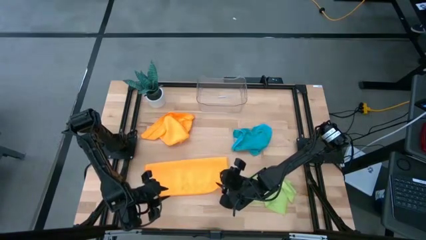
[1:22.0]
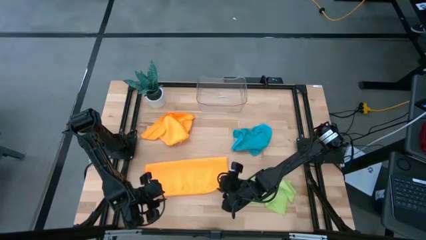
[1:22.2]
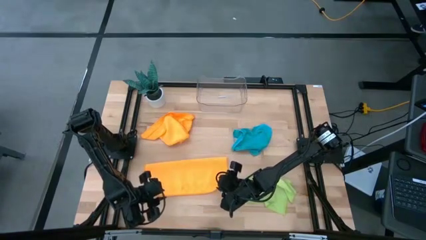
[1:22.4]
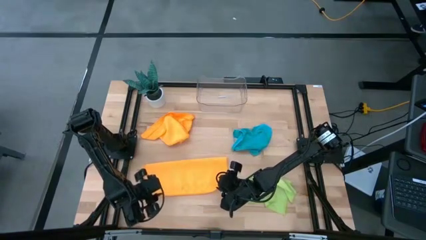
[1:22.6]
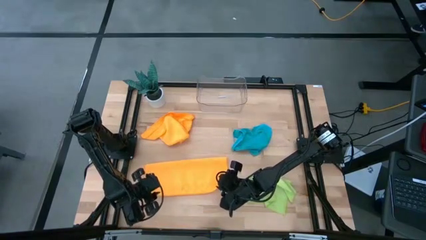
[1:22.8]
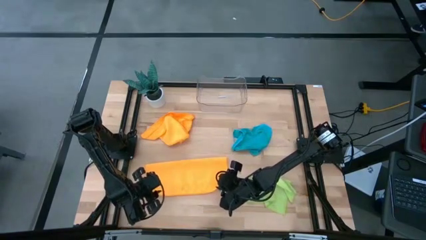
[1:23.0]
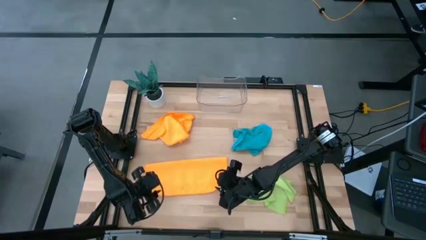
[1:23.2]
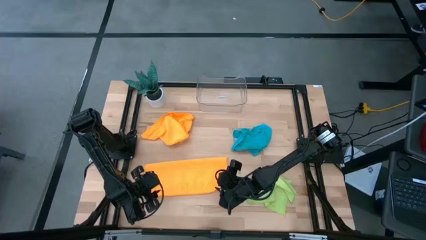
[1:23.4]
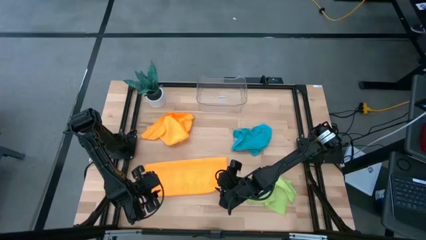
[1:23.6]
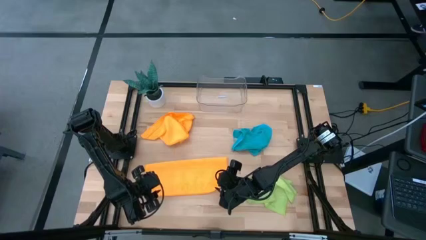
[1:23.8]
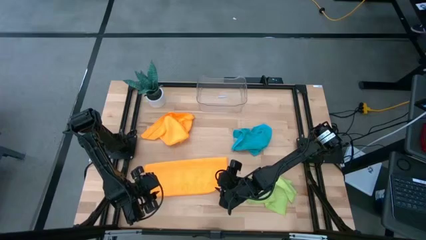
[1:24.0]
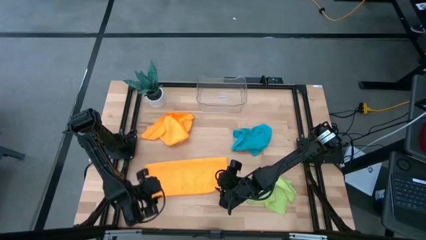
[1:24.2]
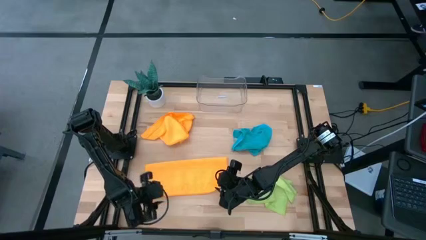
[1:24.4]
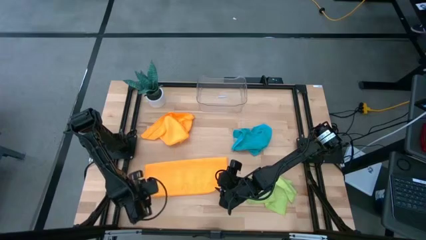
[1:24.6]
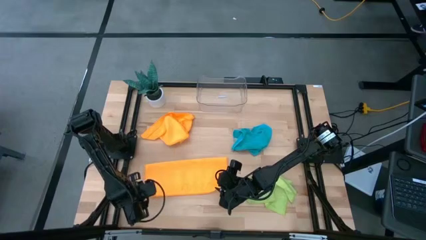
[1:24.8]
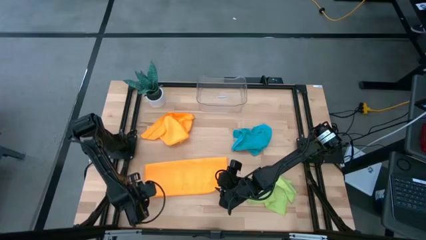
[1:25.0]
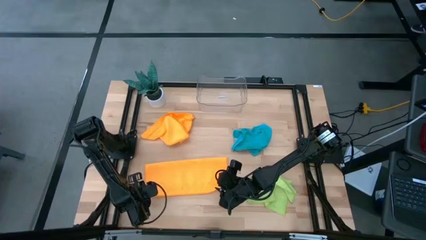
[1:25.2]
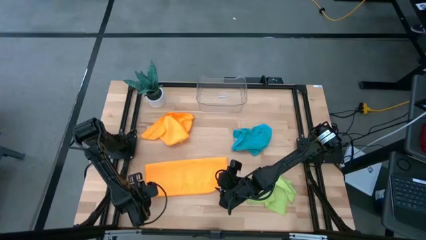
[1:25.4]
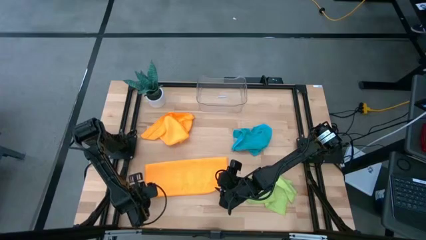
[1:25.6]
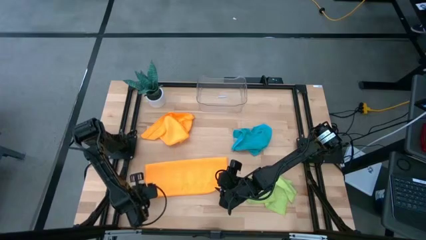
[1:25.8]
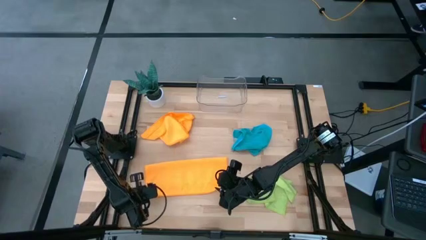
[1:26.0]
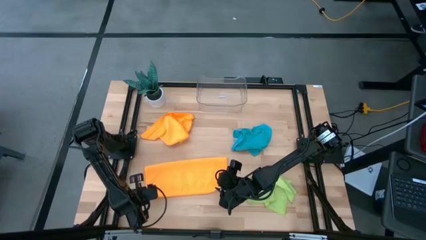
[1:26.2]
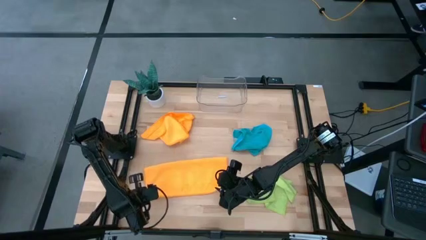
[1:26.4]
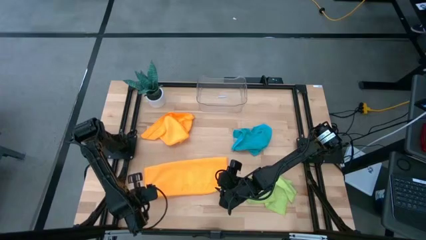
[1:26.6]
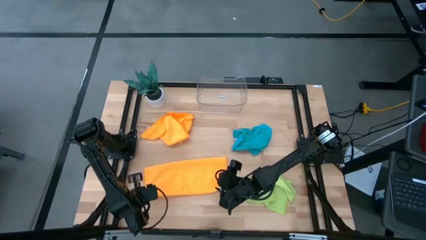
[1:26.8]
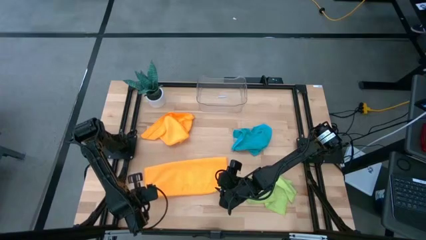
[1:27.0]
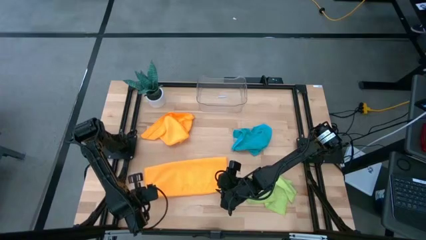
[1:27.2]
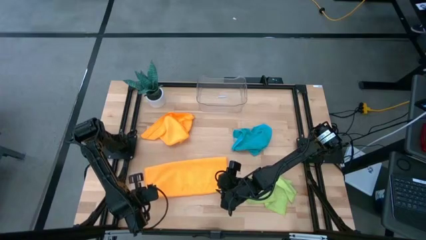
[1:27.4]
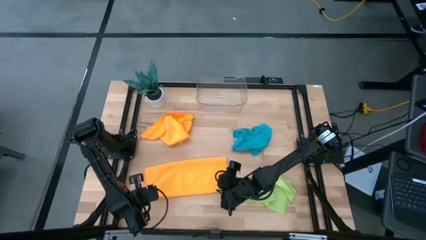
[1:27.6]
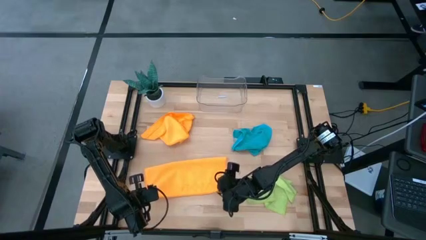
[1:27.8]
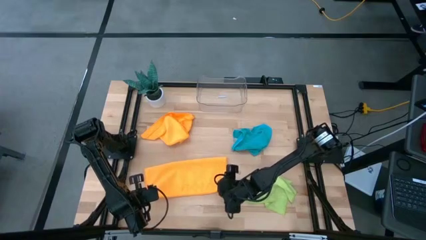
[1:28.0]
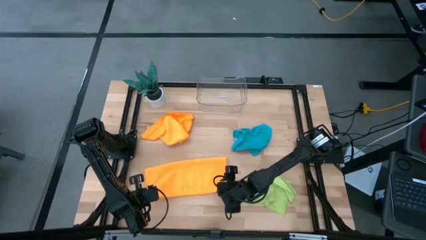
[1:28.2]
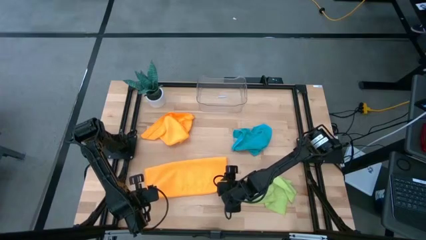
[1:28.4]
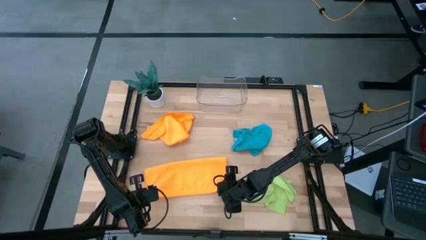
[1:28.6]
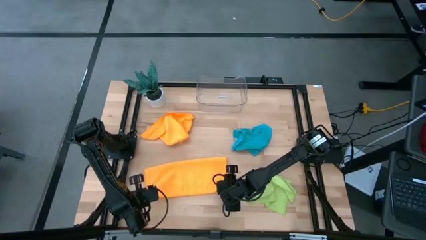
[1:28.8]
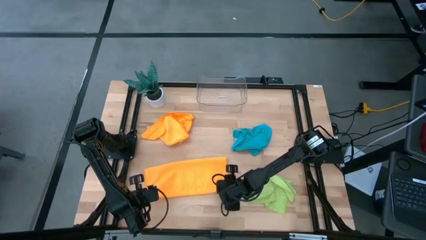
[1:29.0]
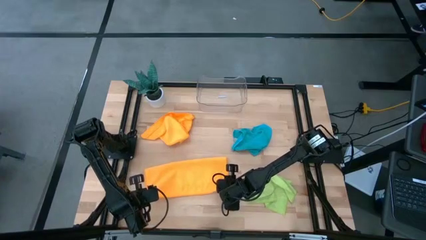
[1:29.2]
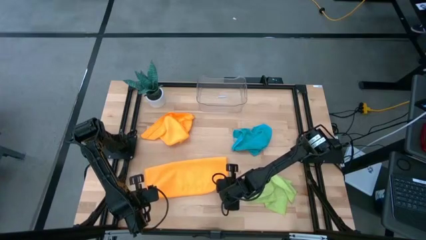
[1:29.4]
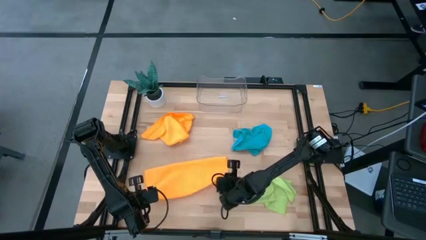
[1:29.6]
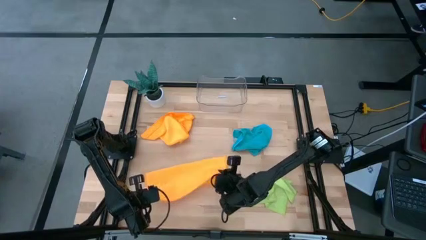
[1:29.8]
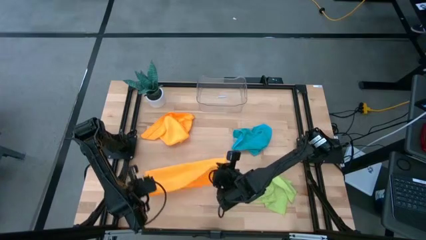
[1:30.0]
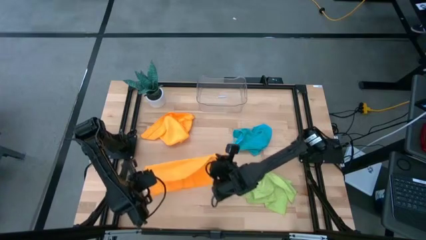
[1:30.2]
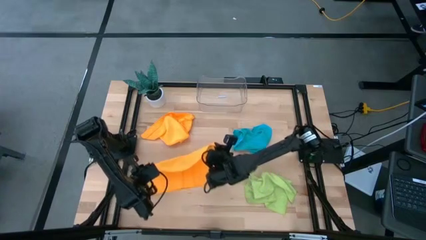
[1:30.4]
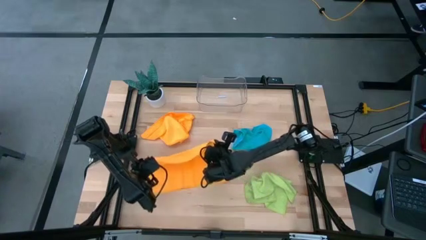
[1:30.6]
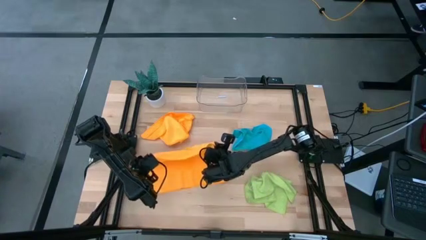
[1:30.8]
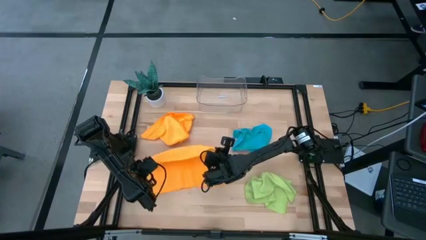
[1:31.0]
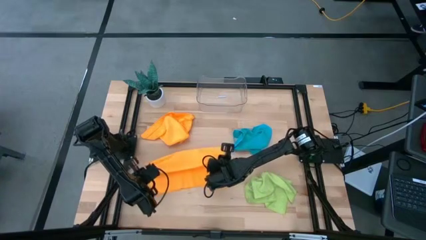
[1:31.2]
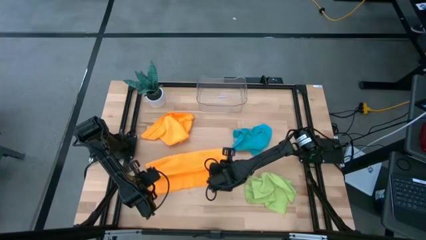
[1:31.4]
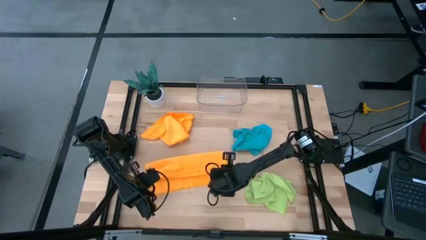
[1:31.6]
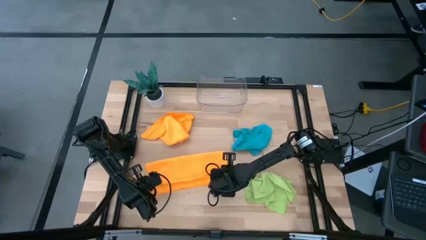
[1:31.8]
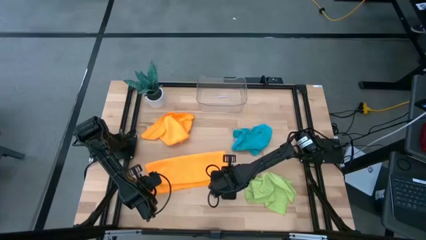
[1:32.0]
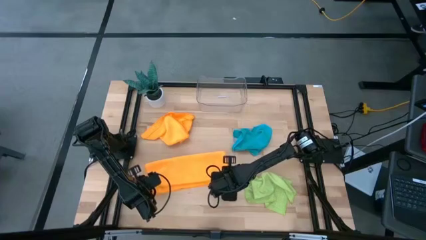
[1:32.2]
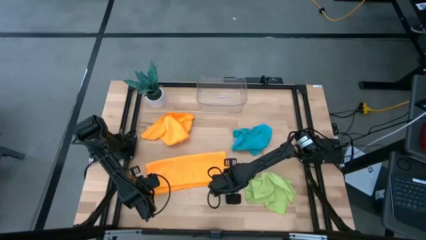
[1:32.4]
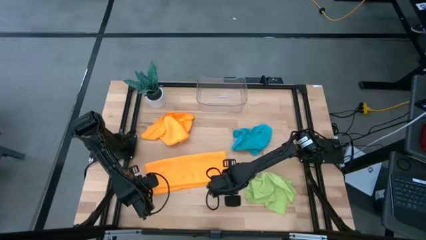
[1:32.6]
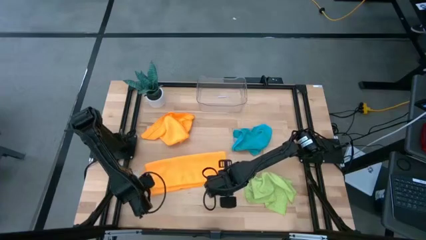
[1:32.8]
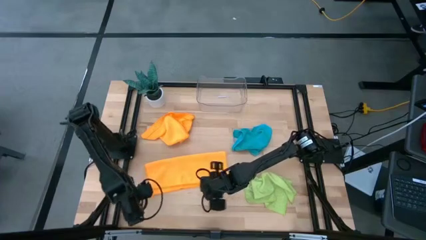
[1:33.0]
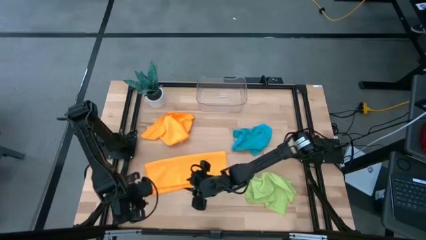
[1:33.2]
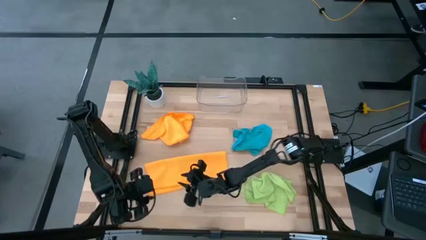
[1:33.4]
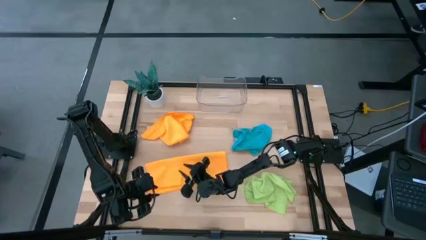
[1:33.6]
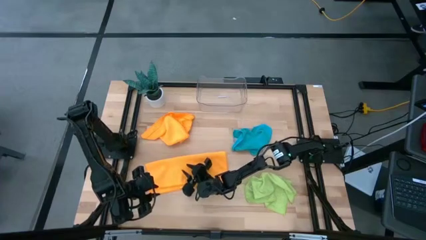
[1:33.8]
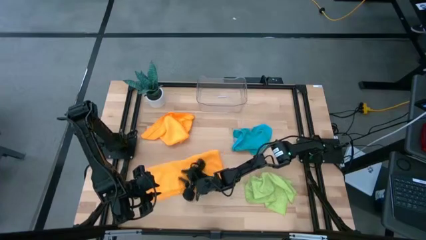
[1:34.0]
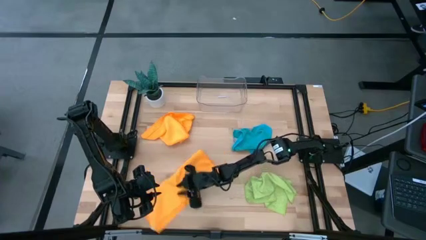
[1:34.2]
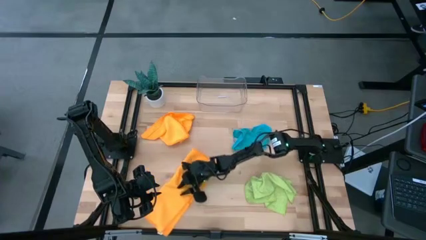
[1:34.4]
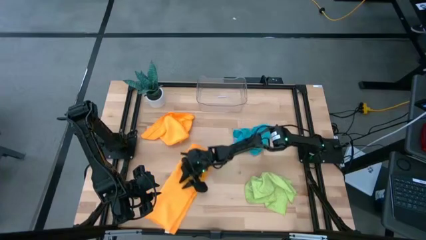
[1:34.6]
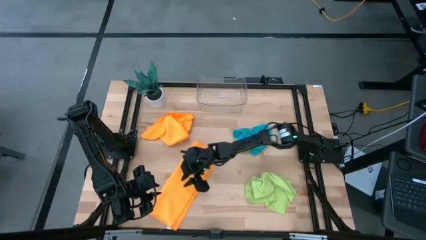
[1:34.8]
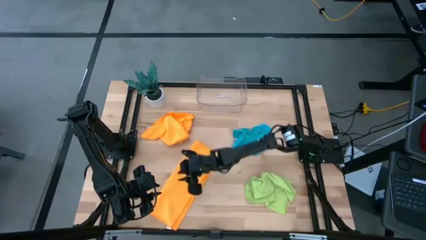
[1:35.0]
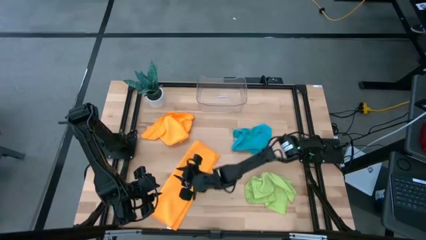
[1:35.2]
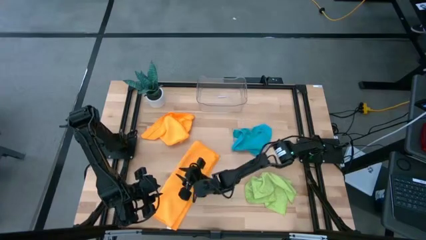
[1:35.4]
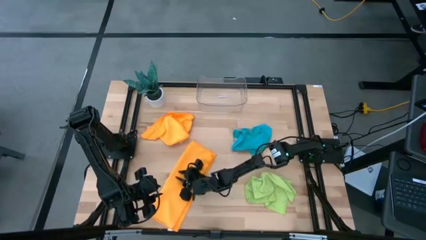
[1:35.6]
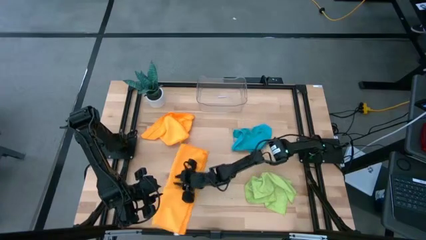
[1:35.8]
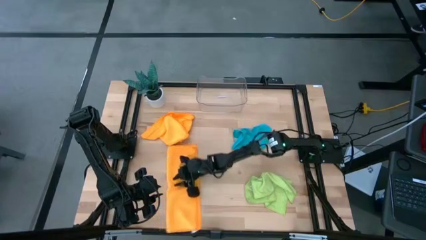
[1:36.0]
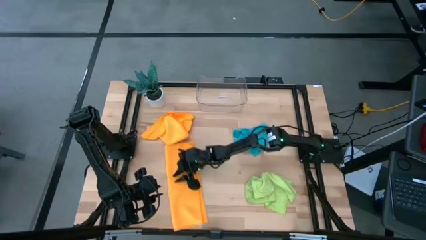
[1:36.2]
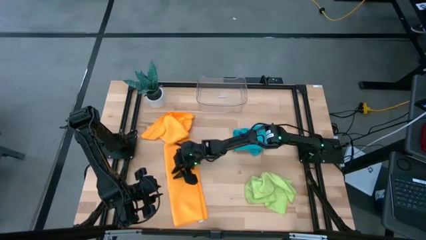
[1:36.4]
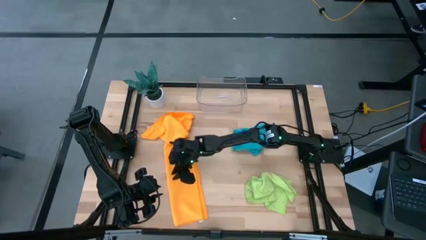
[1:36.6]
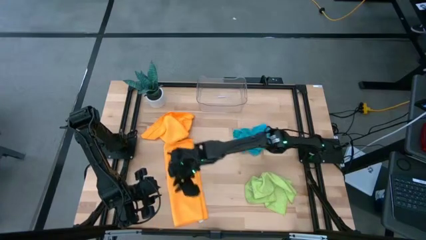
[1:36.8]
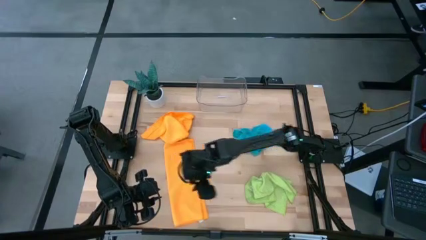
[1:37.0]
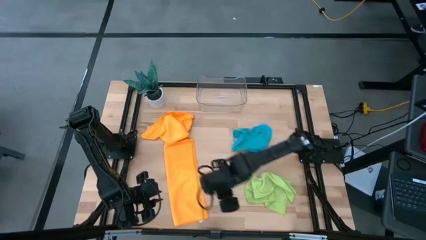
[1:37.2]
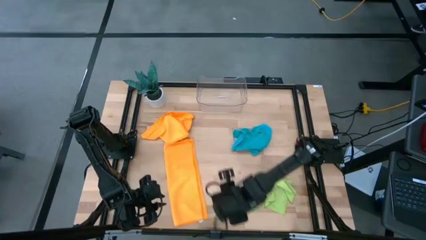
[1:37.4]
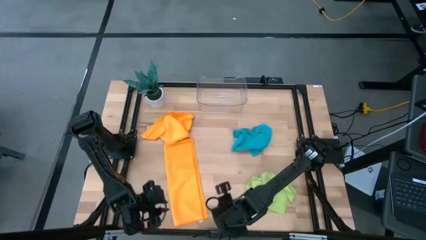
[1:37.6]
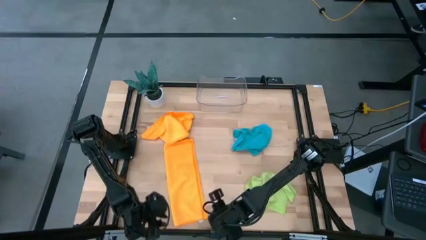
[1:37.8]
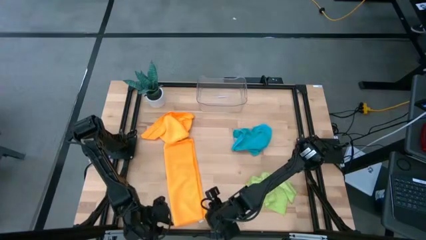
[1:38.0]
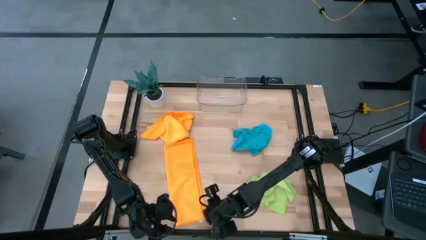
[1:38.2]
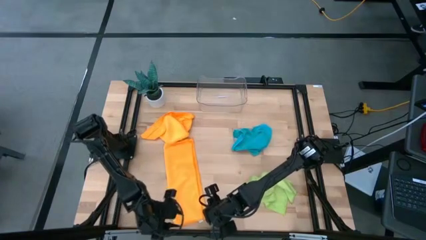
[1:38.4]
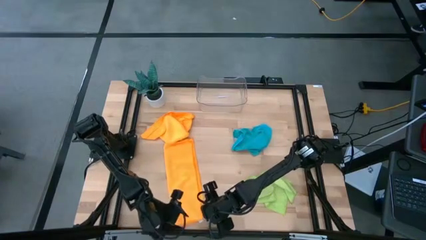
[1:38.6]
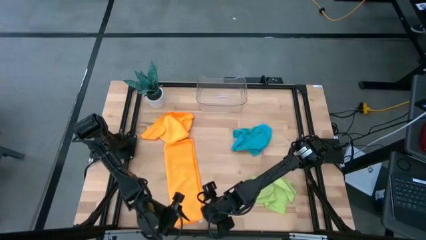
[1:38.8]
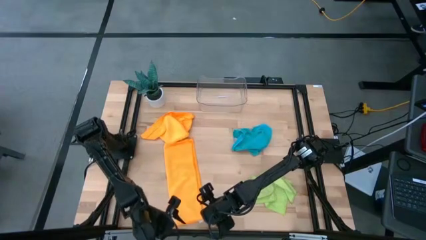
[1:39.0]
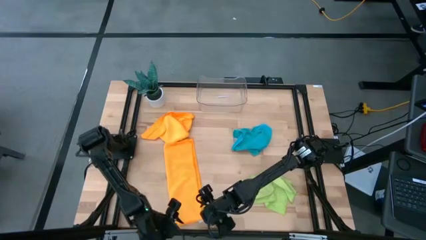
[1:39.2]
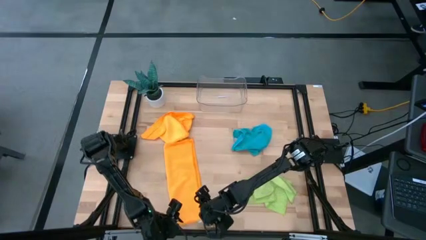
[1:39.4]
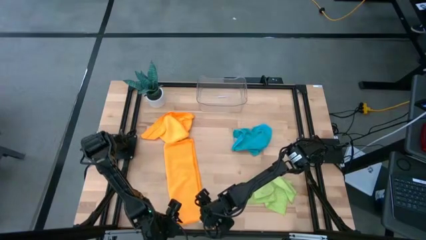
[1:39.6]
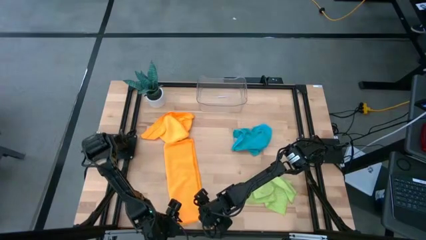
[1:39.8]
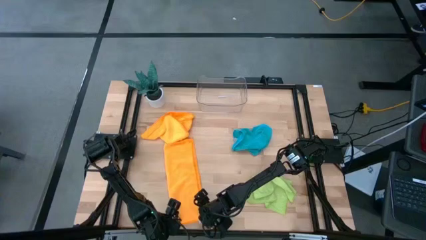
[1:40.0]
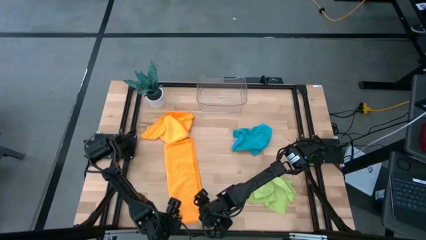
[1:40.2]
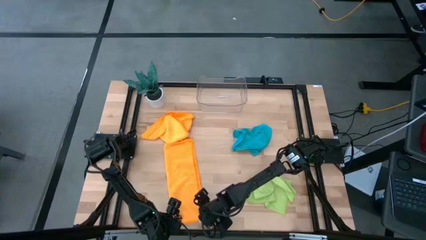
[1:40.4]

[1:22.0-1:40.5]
Task: Fold microfiber towels
Fold the bottom orange microfiber towel
